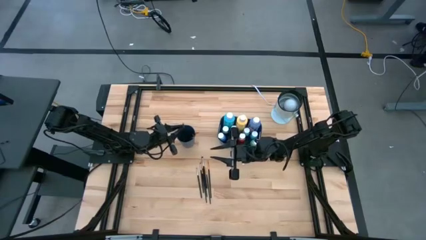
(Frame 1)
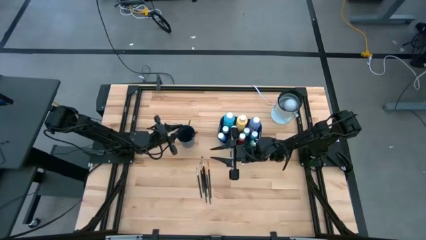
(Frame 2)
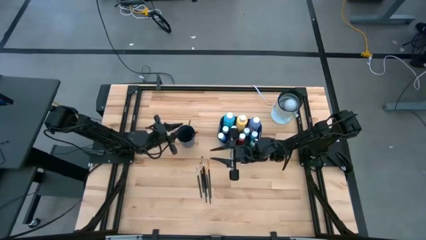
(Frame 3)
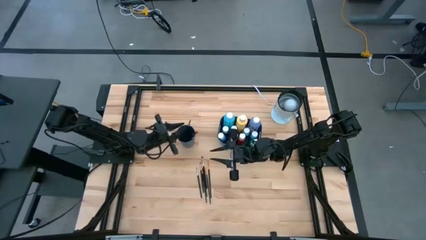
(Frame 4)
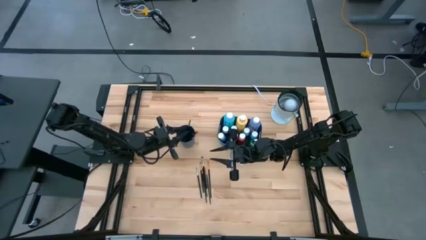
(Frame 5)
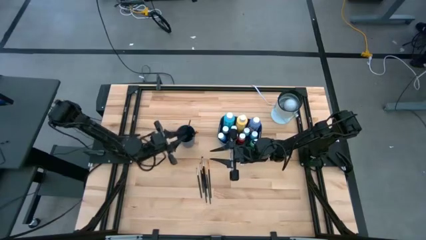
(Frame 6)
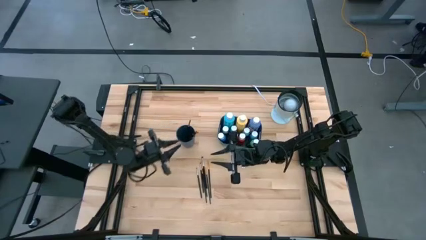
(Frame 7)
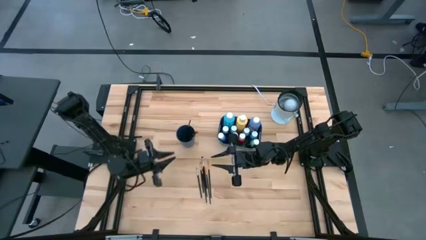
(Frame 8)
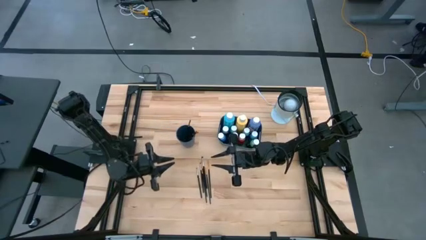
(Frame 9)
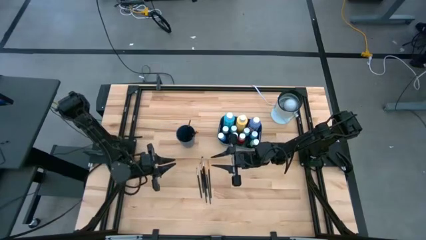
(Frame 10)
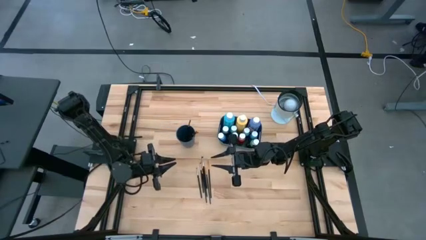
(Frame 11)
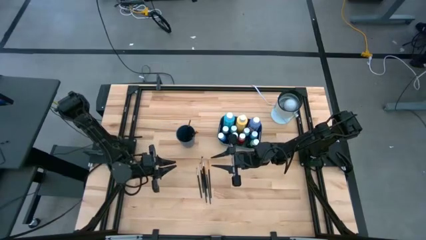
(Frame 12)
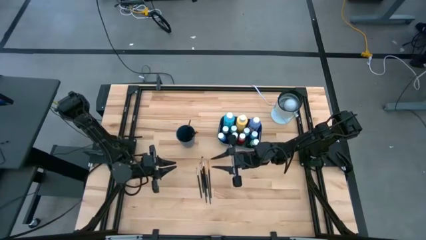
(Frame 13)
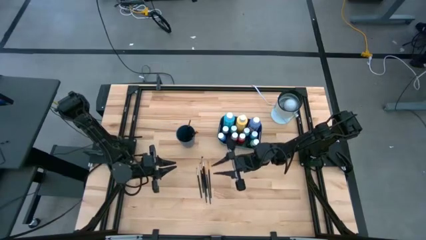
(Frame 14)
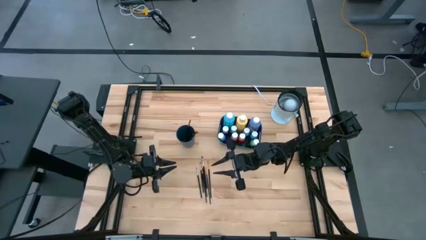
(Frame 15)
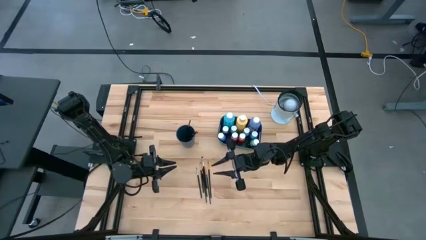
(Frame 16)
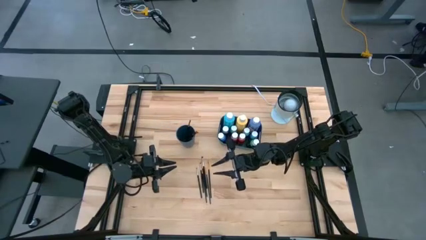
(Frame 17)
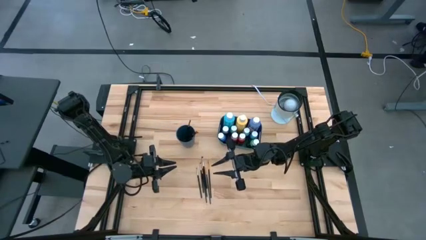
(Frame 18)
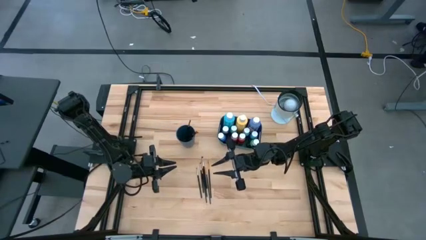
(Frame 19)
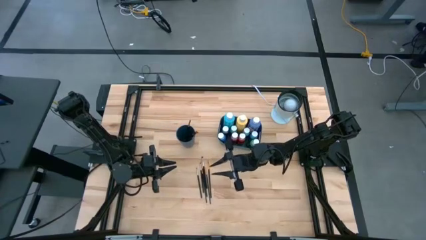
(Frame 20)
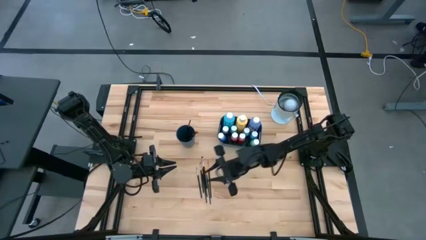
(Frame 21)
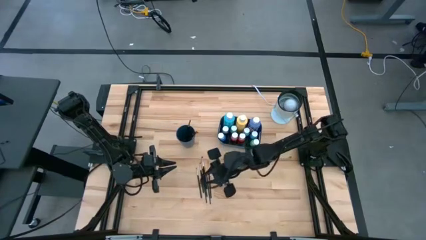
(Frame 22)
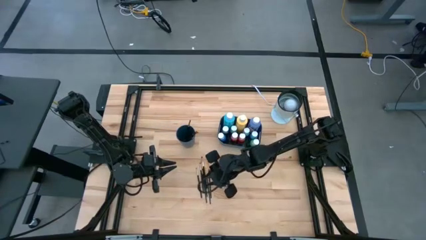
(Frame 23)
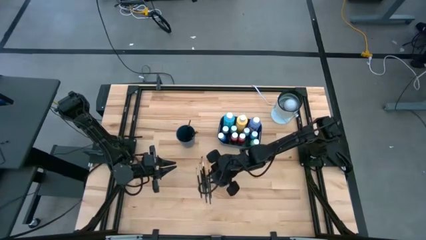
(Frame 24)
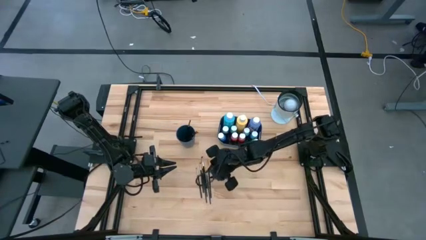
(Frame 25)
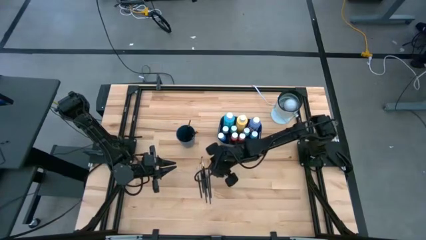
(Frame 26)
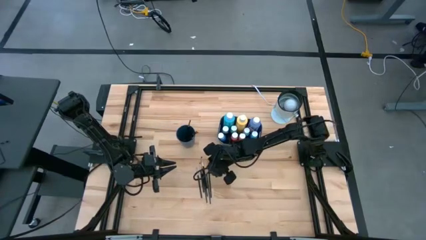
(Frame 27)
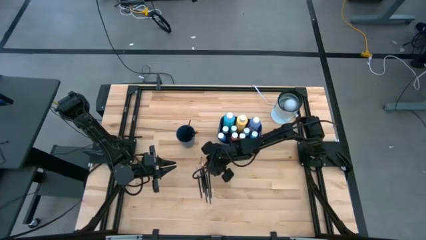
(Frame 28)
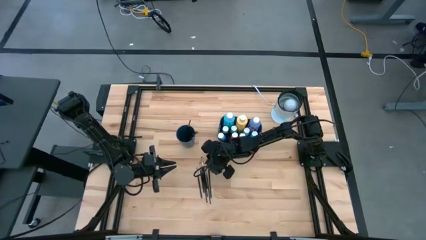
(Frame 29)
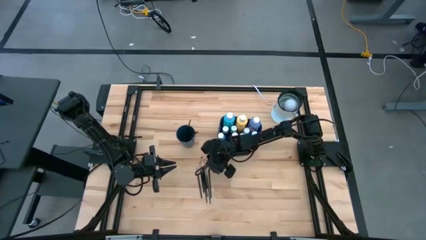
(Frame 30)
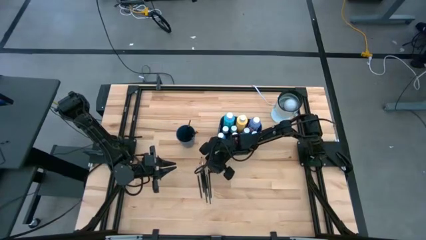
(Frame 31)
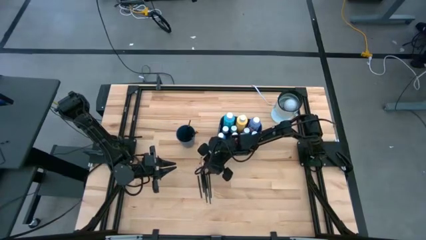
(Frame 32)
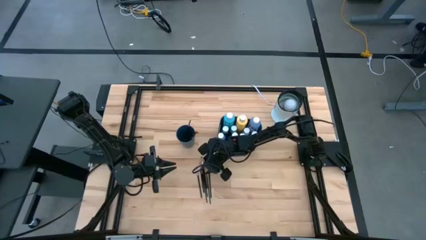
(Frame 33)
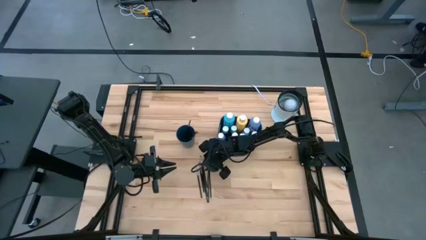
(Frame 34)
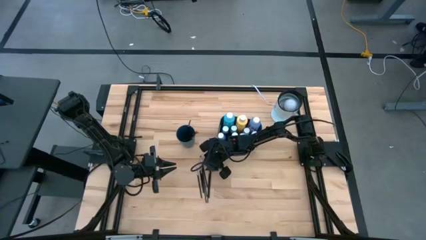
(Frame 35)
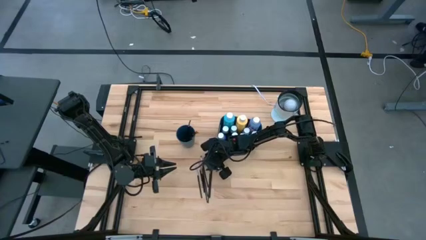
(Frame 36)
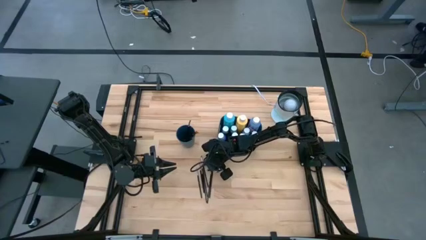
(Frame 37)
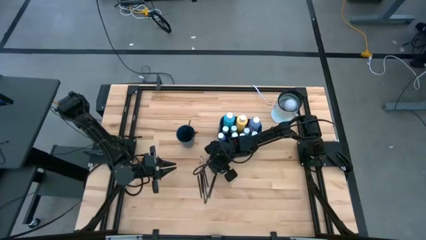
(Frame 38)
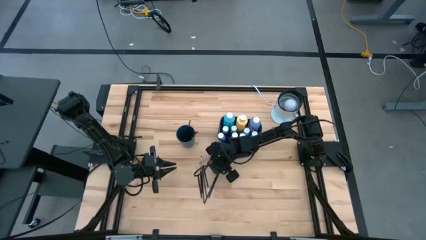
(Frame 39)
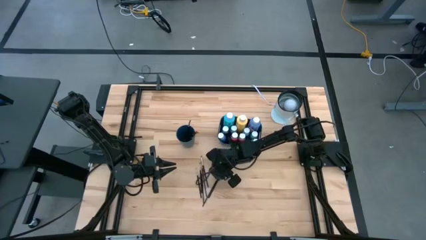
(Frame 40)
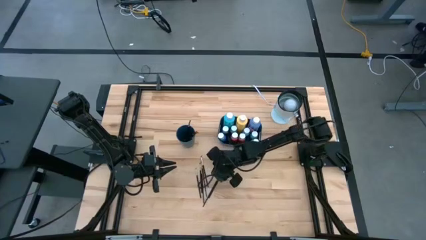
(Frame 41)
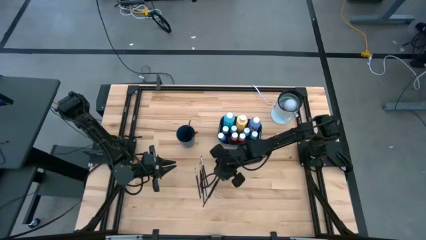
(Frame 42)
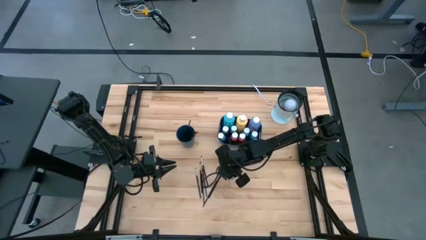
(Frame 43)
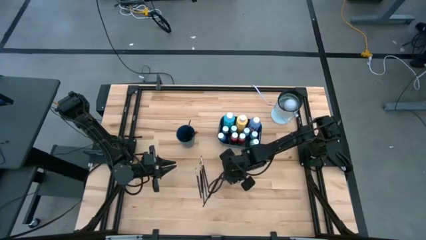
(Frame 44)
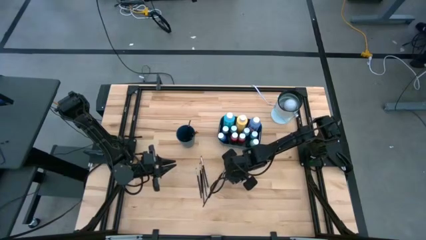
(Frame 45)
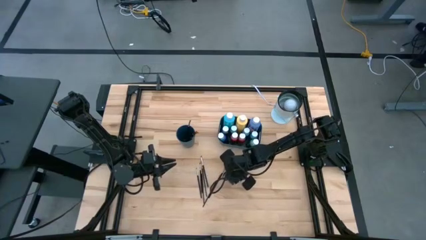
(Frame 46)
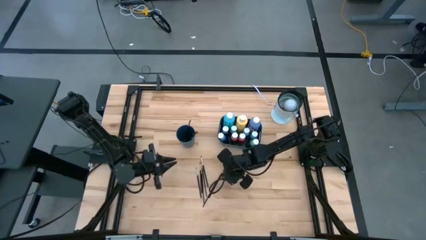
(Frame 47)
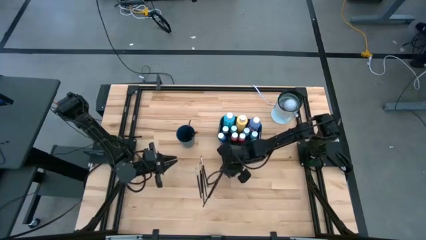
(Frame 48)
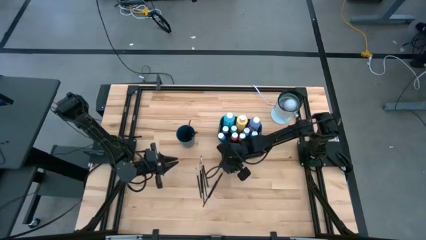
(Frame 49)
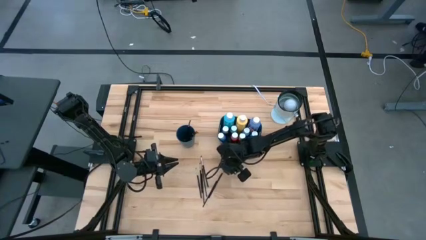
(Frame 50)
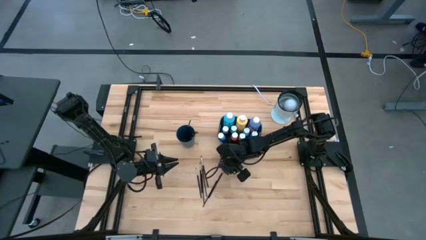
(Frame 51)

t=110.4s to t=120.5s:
Task: Pick & Place Paint Supplies
Put the gold paintbrush into the blue cup
